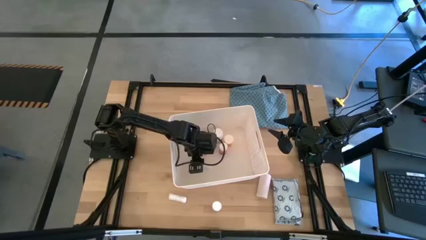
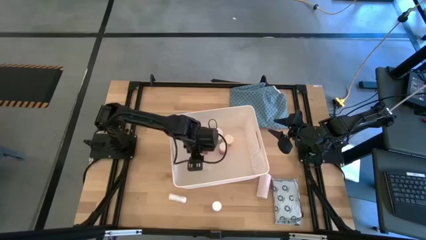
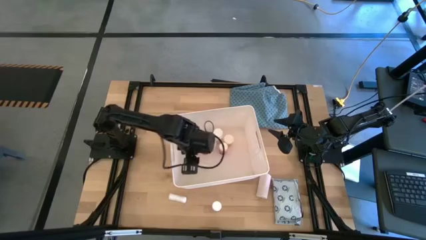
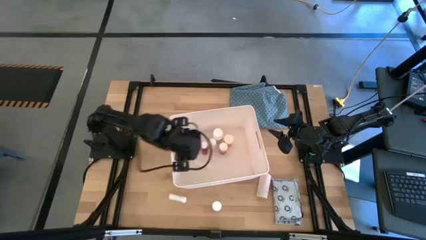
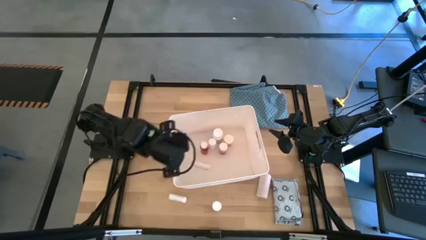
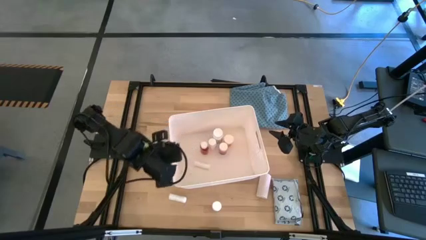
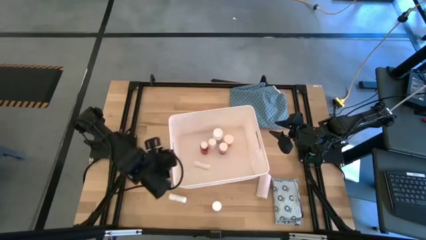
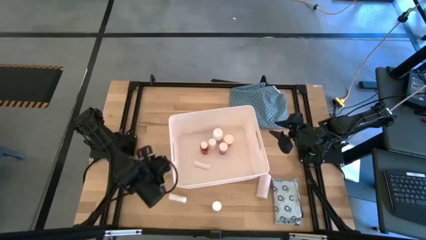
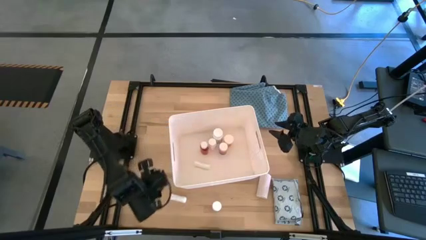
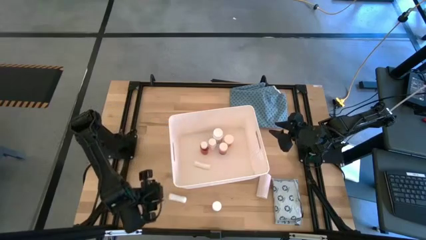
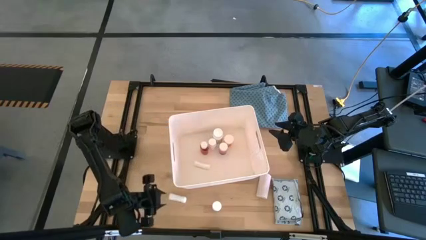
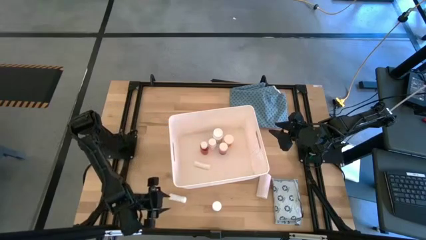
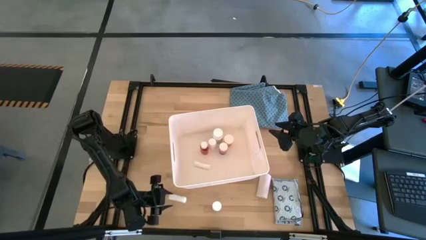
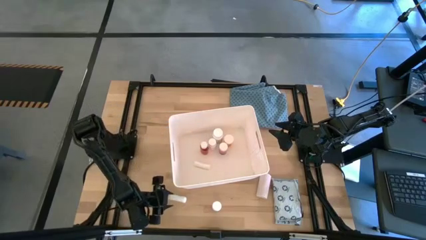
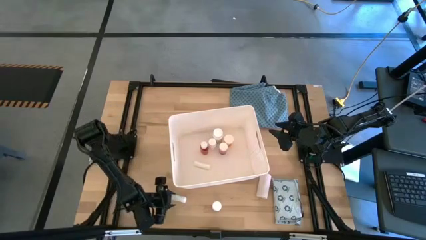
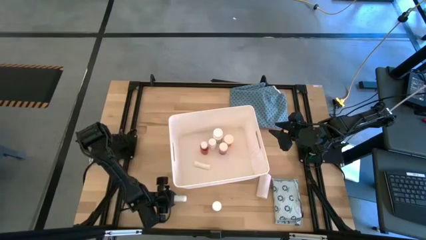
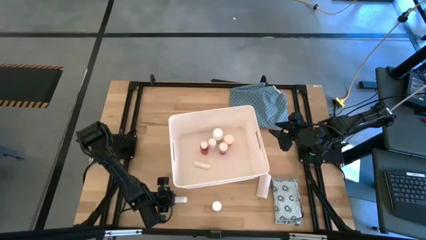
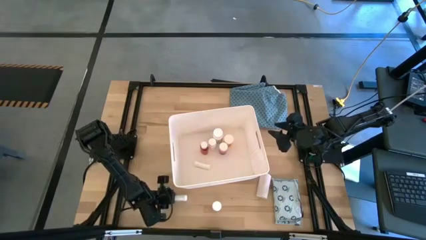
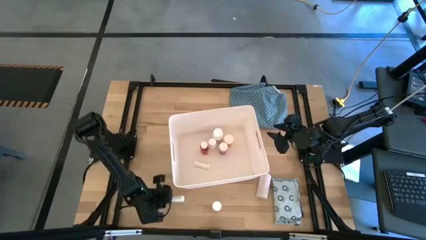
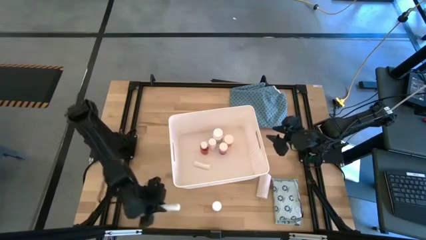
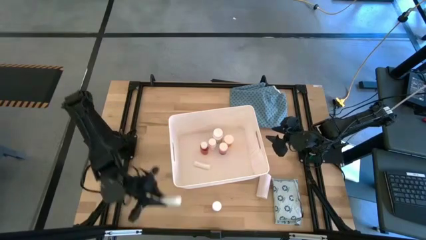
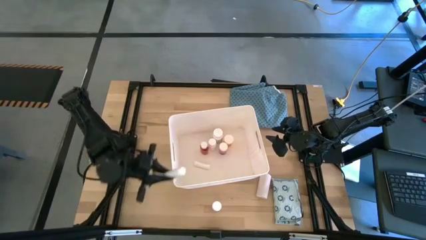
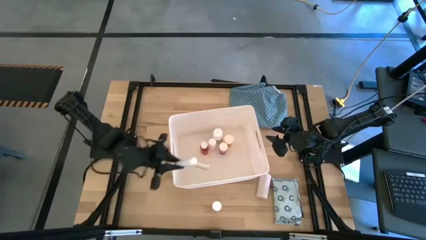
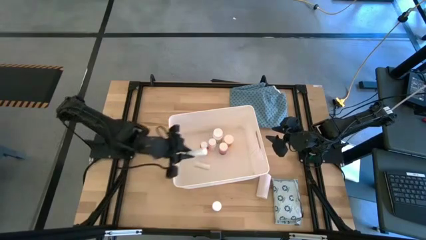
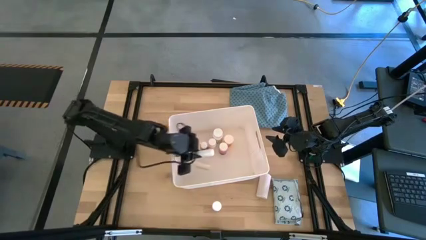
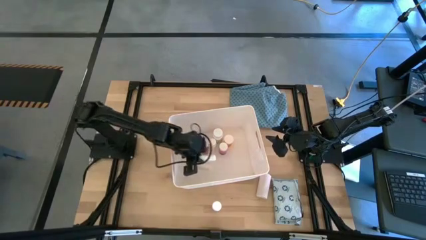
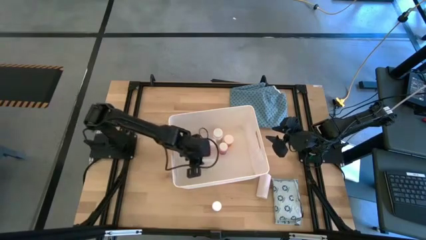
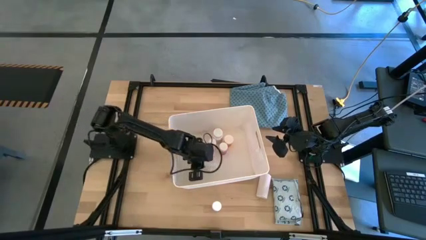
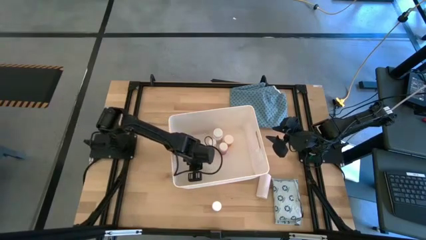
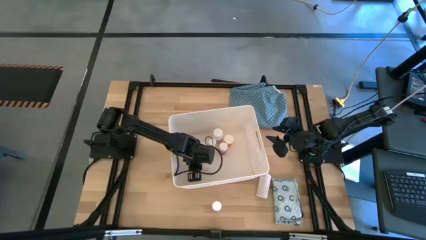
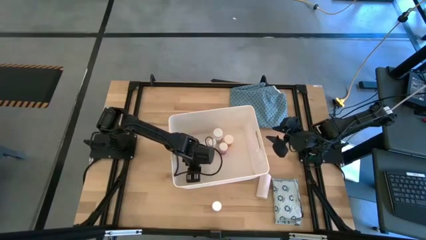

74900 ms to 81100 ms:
Task: Pick & place medical supplies in basket/bin
Put the white rolled gauze into the white bin

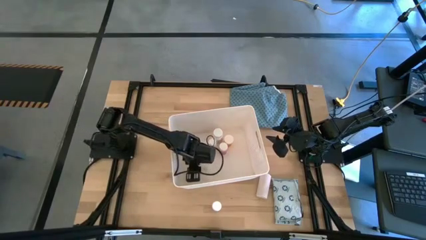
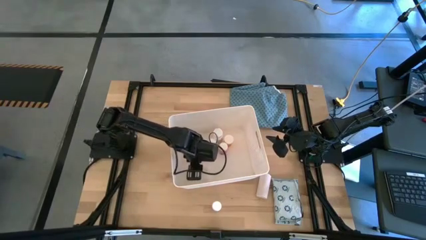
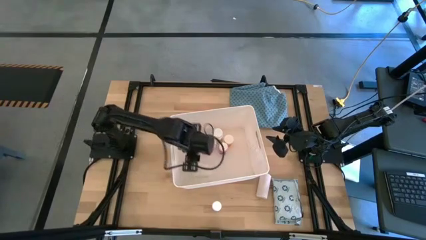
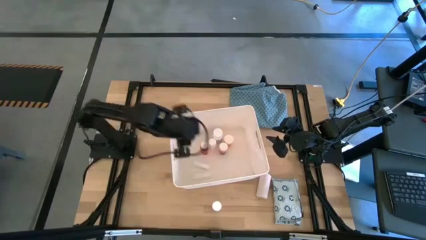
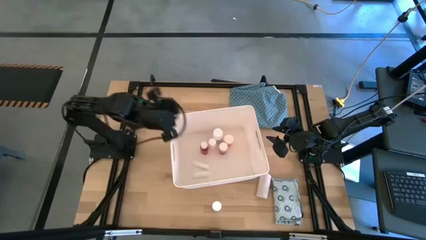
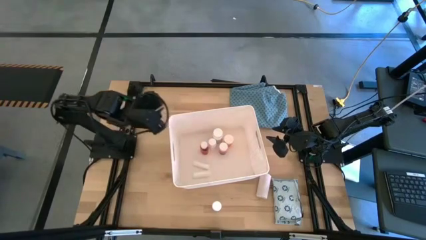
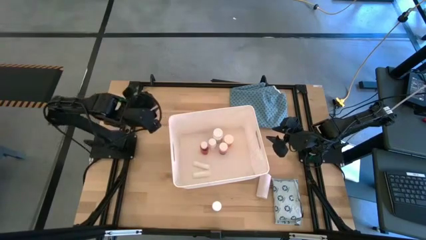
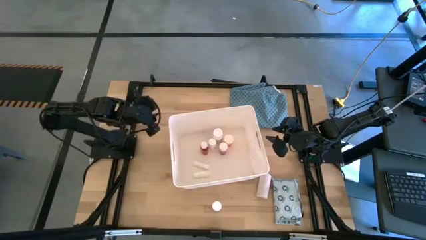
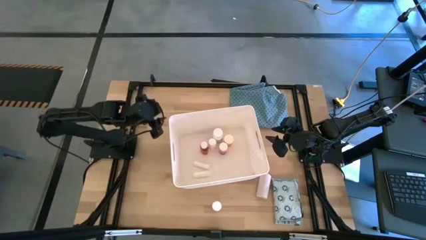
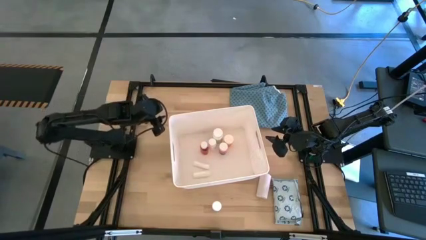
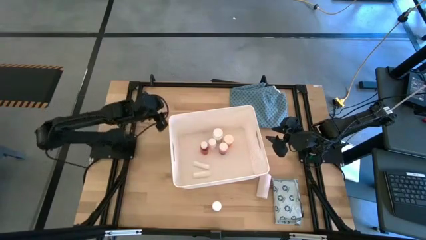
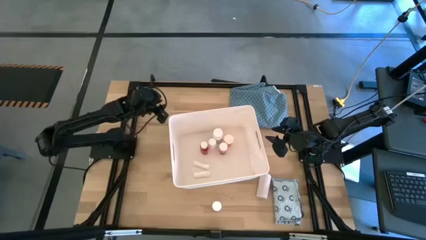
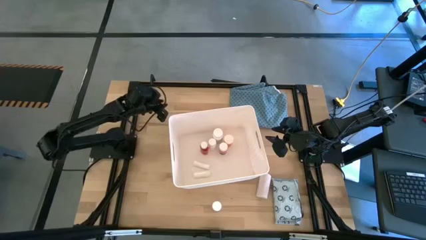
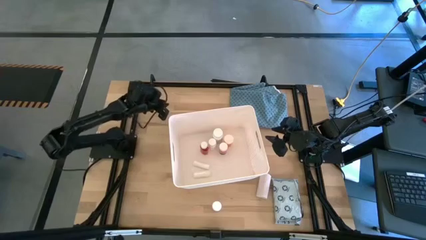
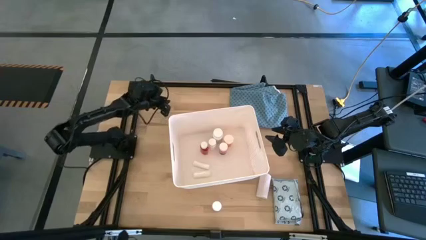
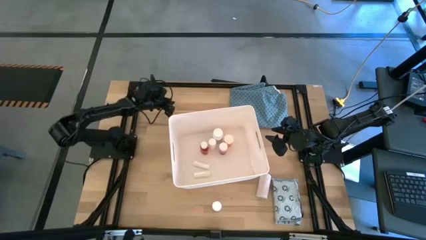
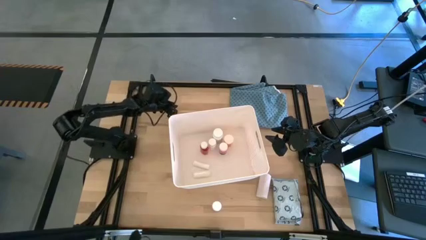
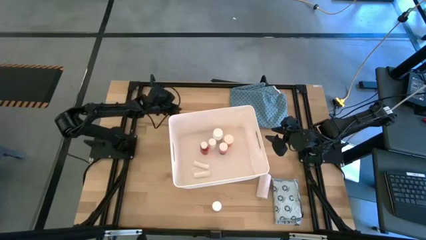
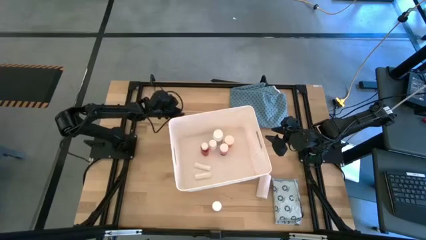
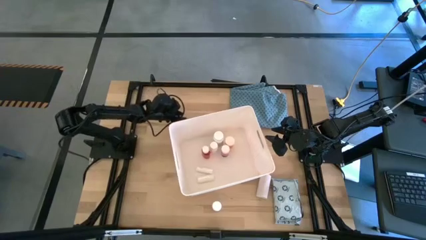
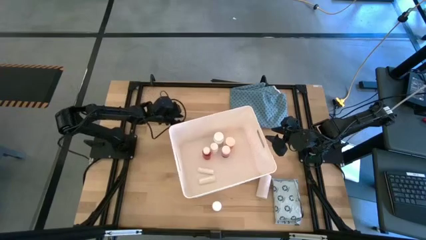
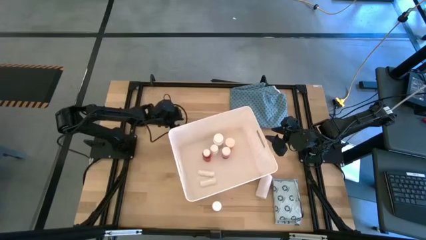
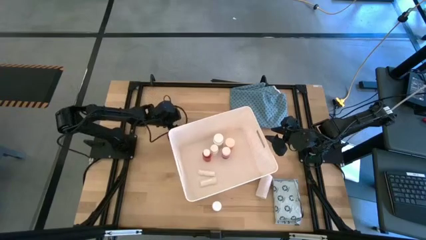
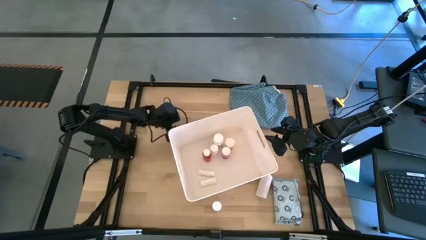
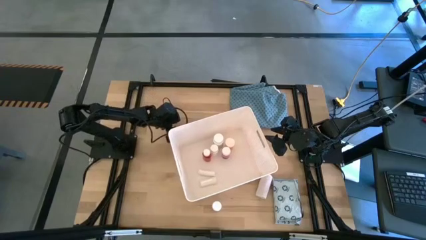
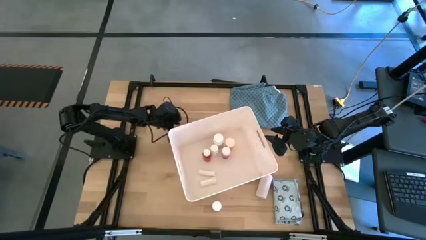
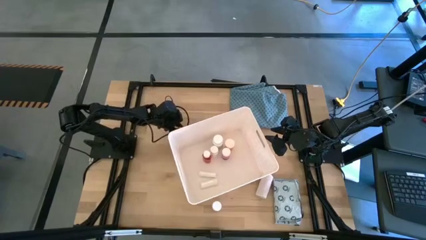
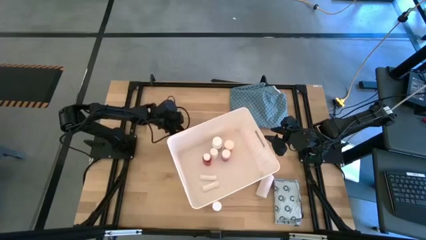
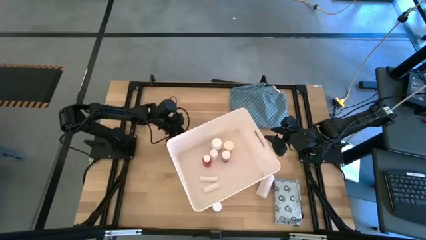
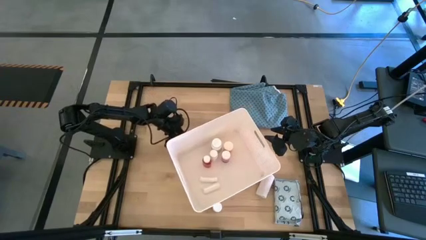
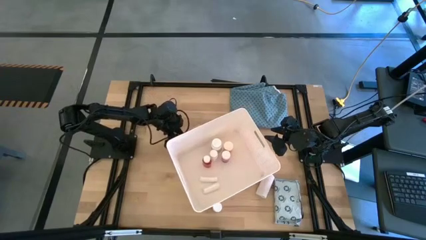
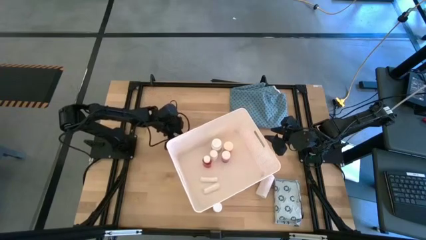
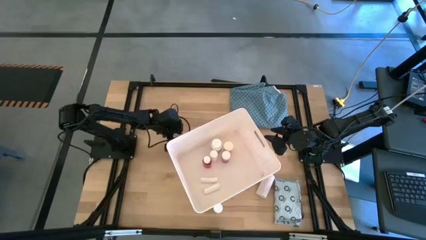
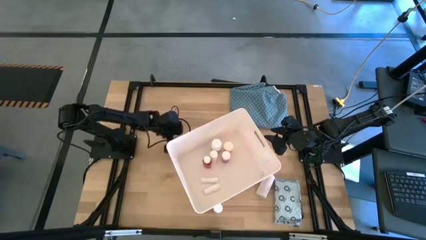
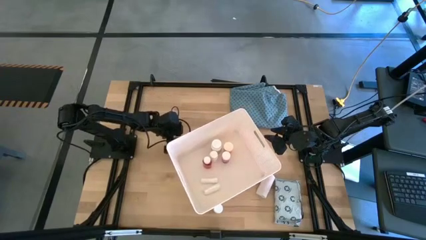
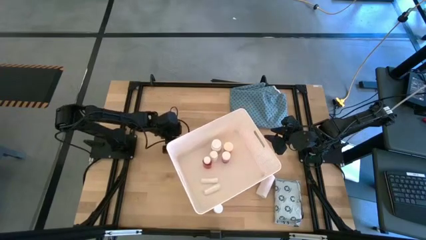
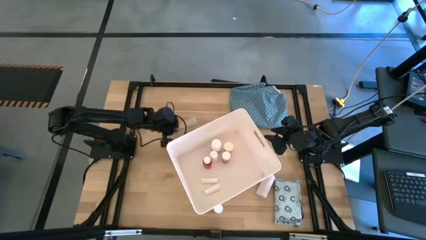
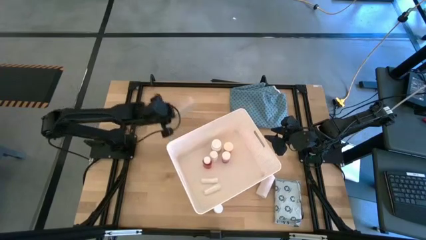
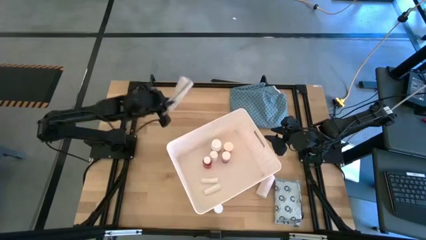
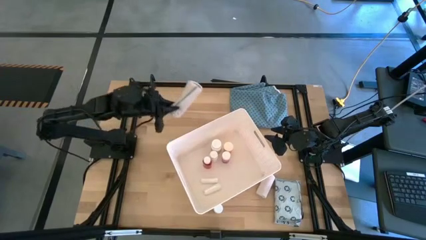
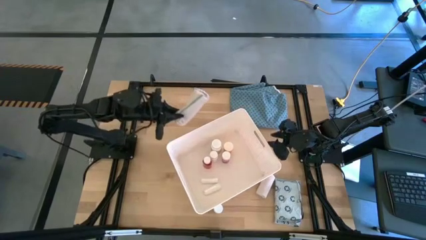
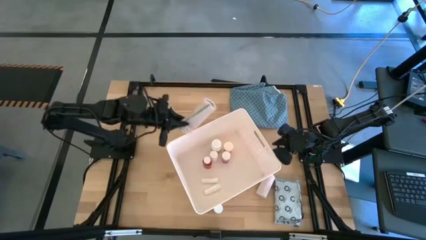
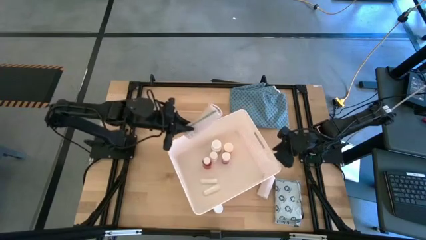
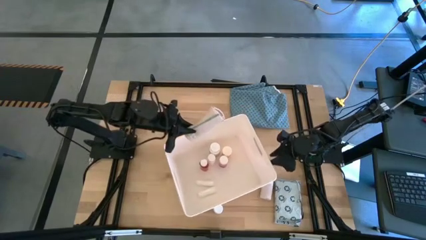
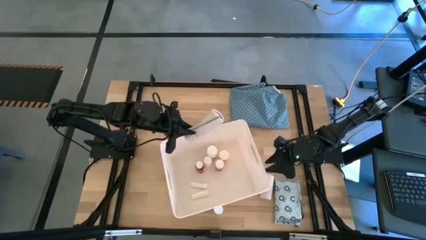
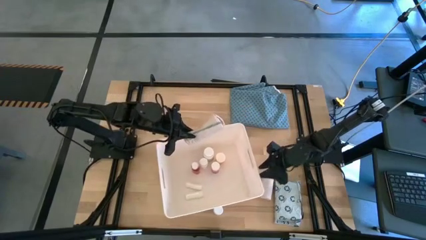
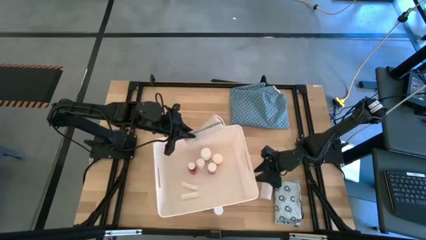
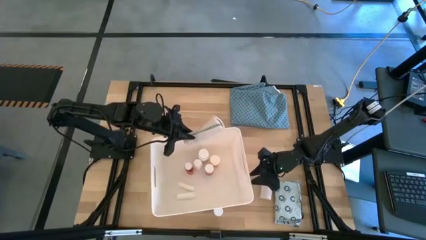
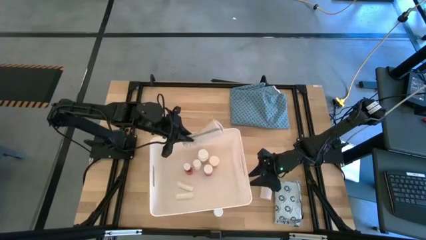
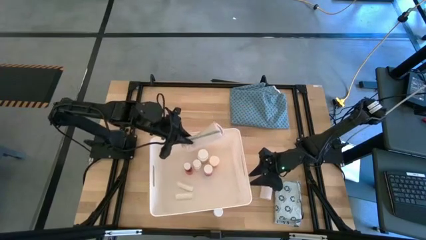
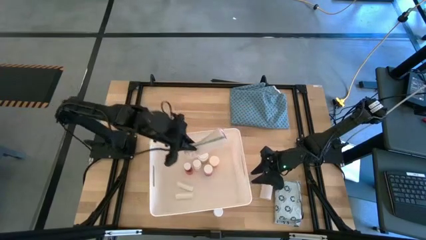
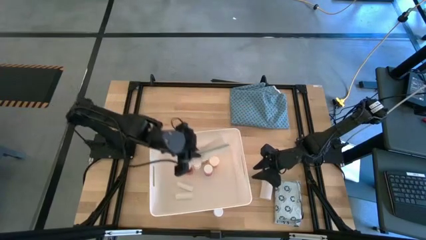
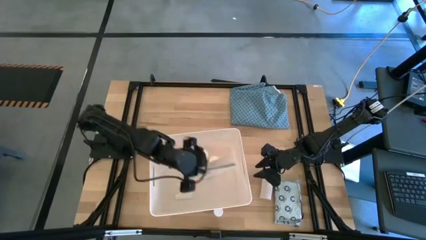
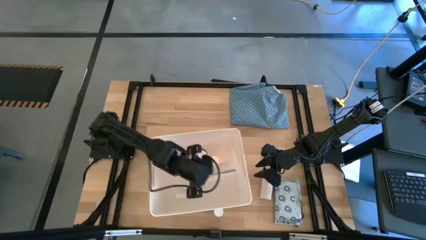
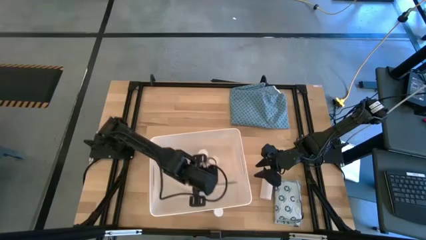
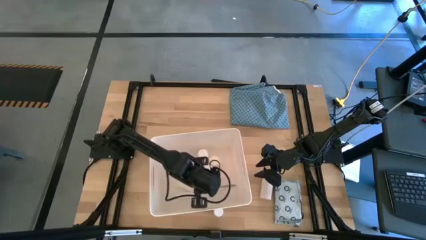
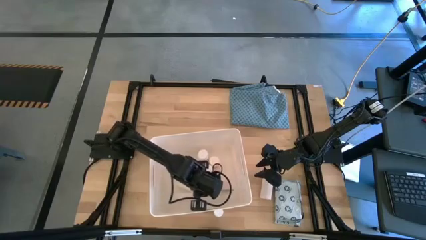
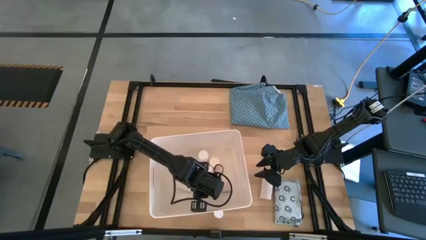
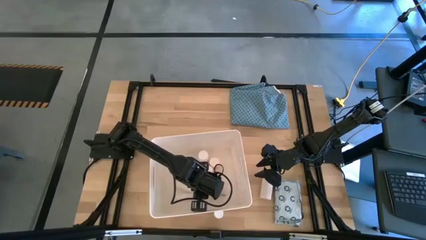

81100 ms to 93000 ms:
Put the top white bandage into the white bin
